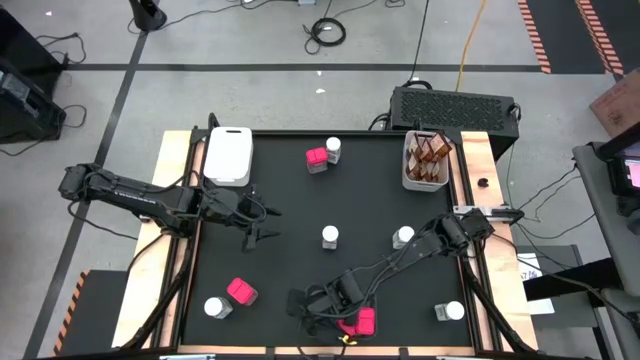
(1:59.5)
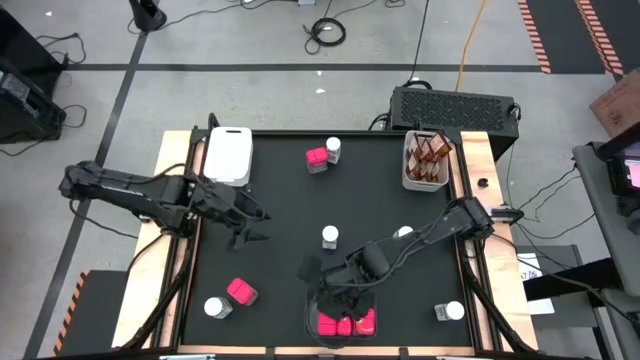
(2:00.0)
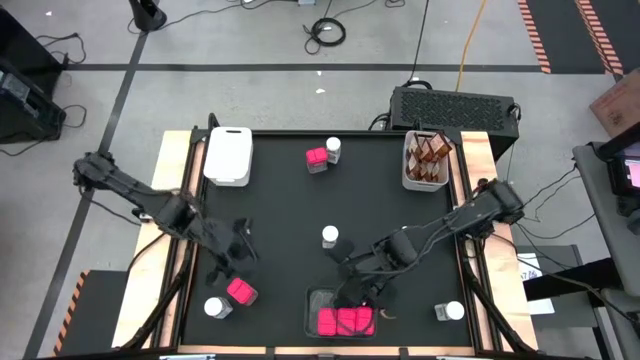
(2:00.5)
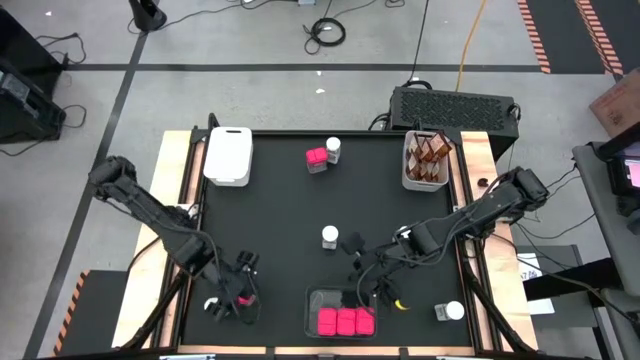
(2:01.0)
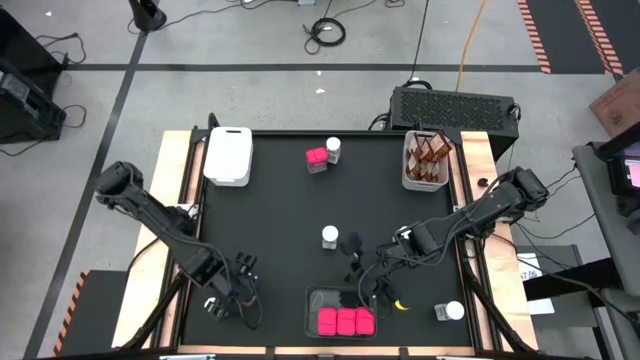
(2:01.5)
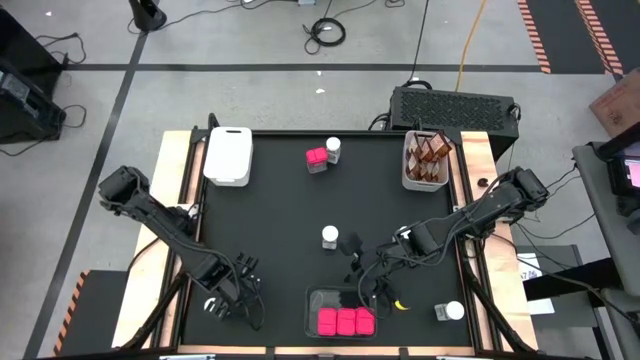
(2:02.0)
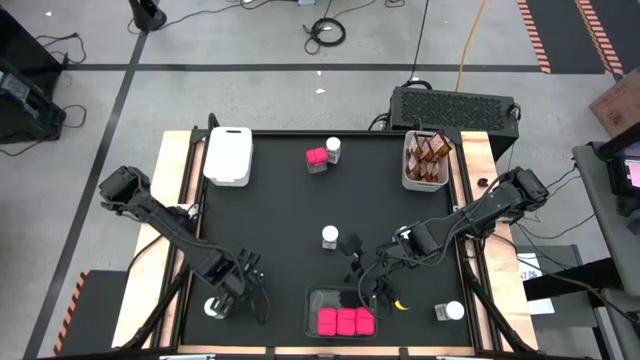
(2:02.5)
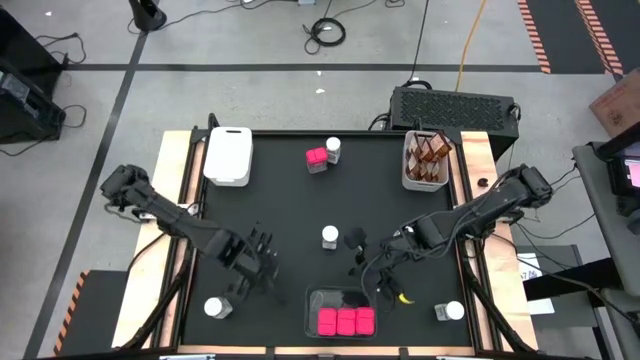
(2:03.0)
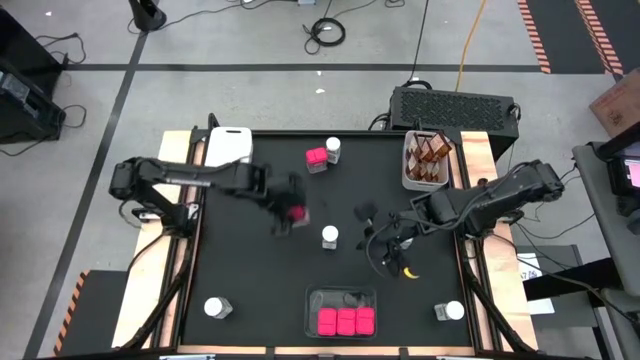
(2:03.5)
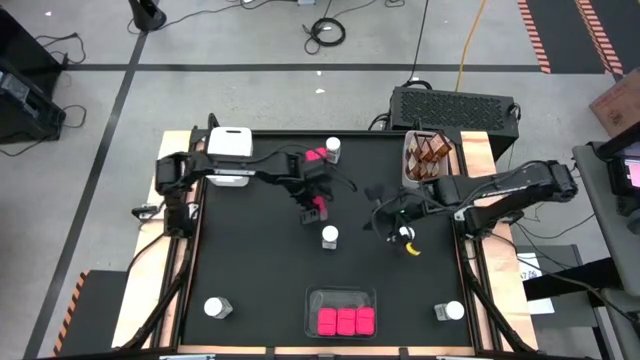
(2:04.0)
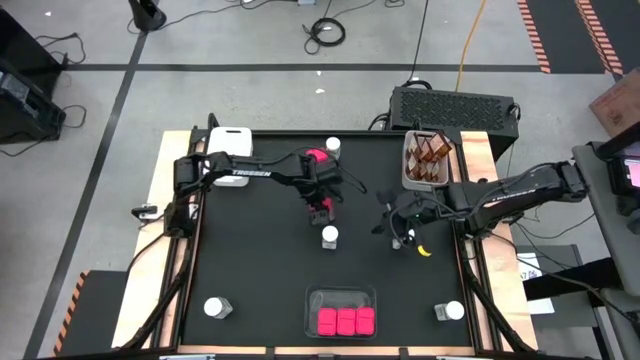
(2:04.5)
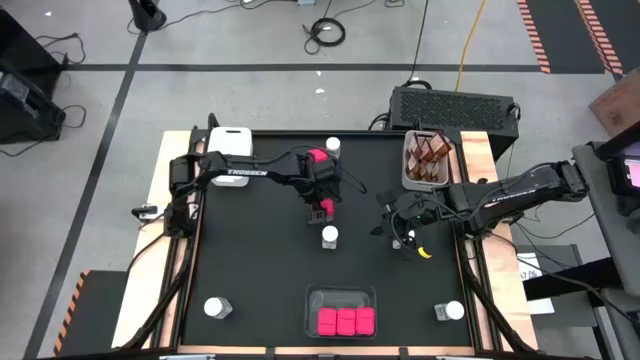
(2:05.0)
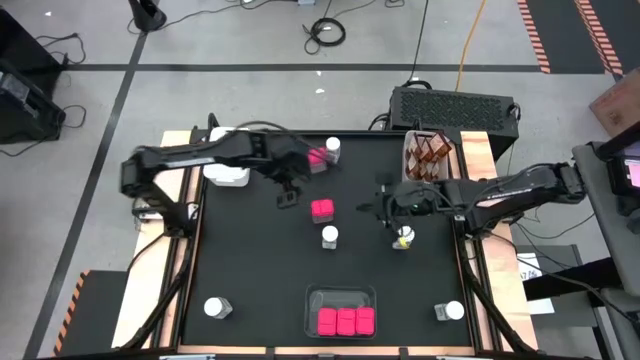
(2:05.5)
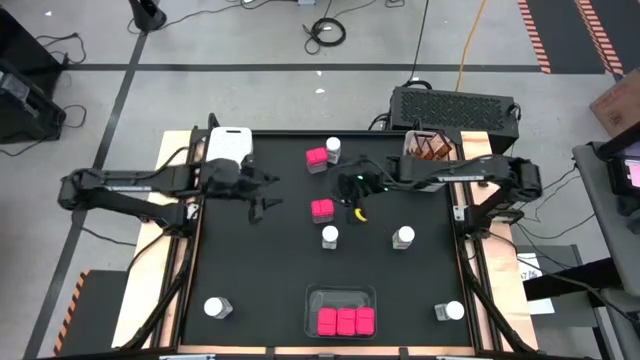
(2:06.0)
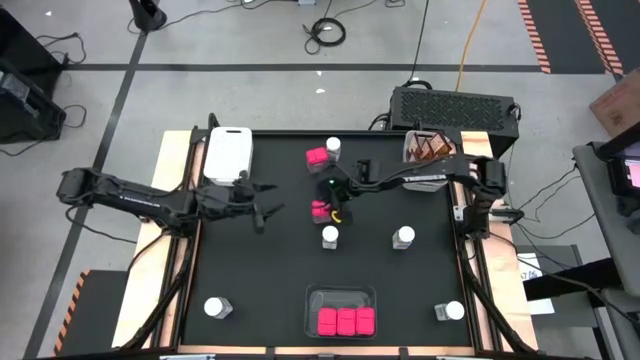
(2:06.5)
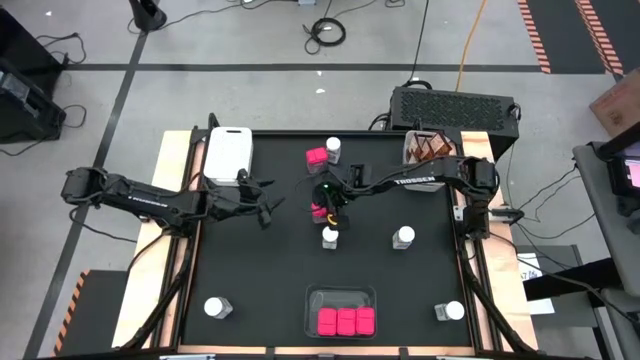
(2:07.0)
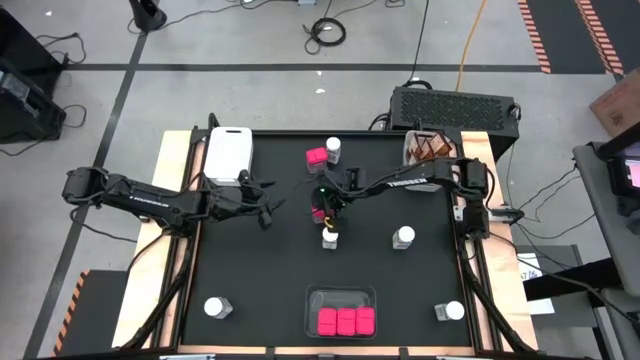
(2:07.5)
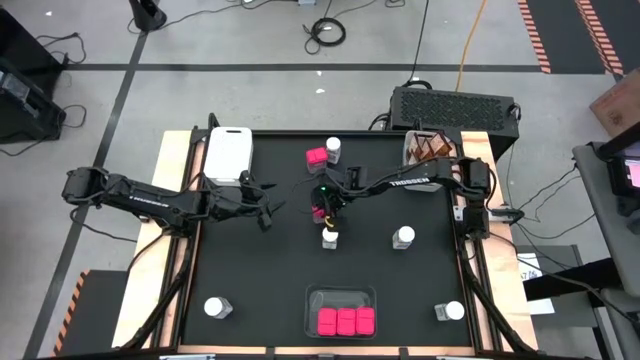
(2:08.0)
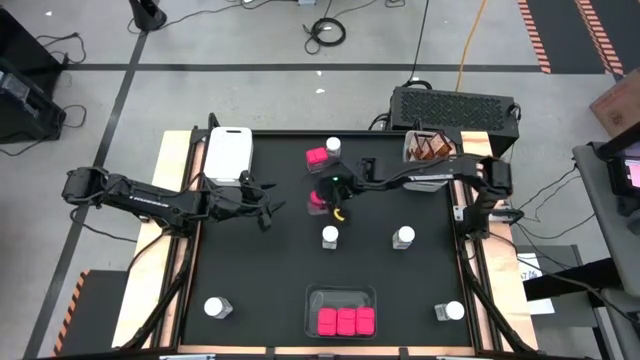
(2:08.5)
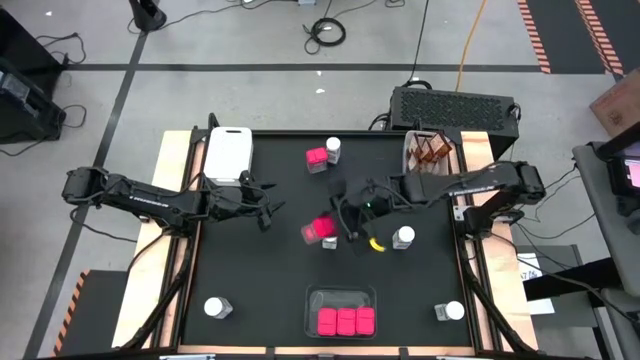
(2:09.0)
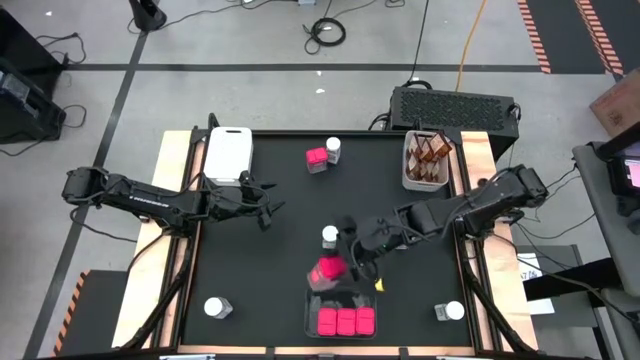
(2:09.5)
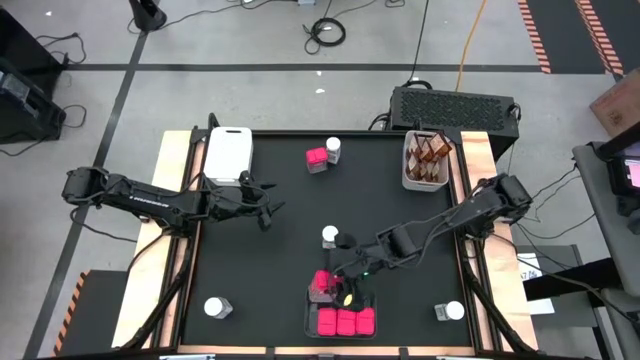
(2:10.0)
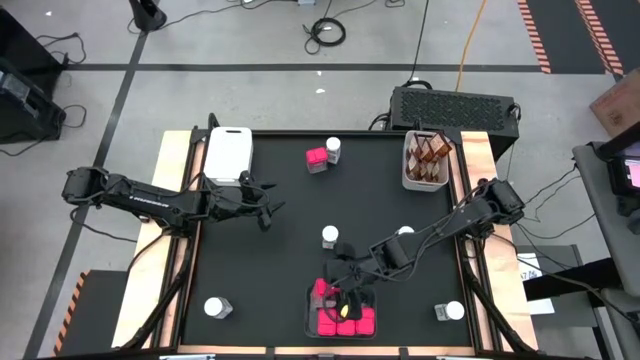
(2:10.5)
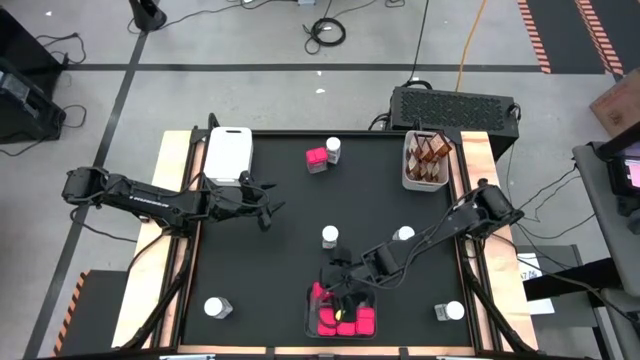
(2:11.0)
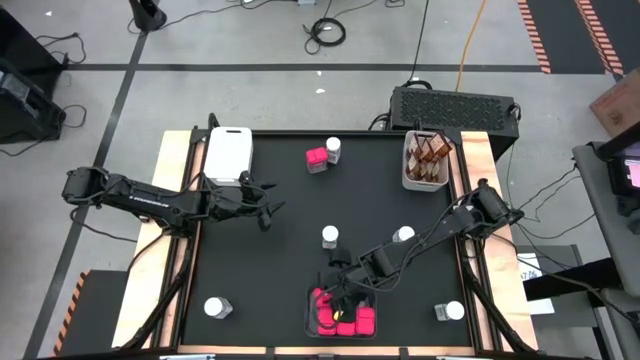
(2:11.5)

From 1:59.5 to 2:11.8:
Task: Sort spices by type
Put the red seasoning can into the black bin

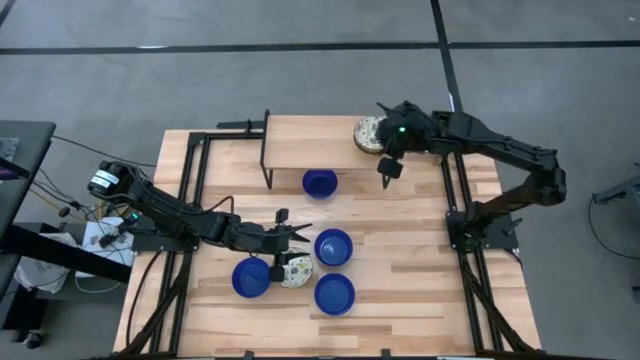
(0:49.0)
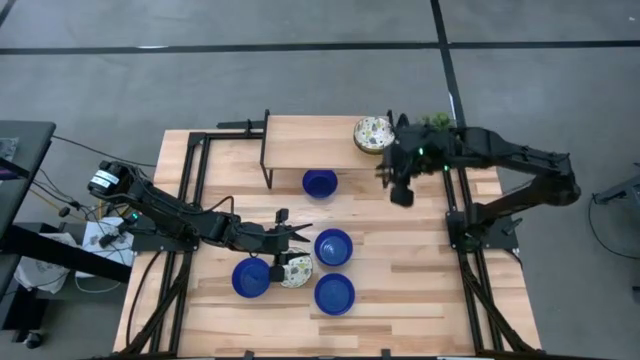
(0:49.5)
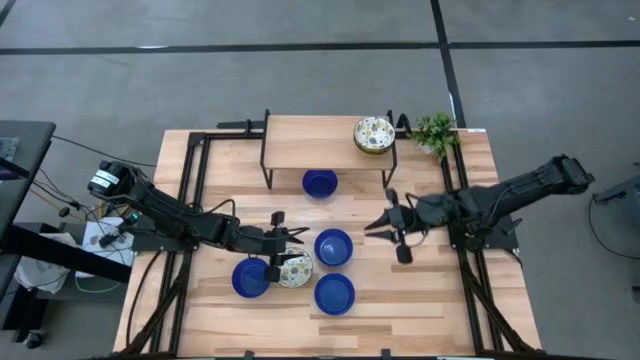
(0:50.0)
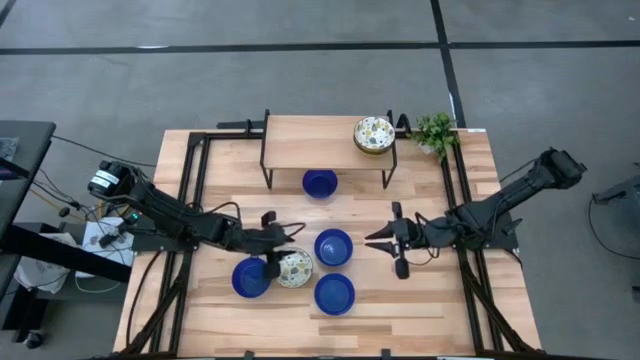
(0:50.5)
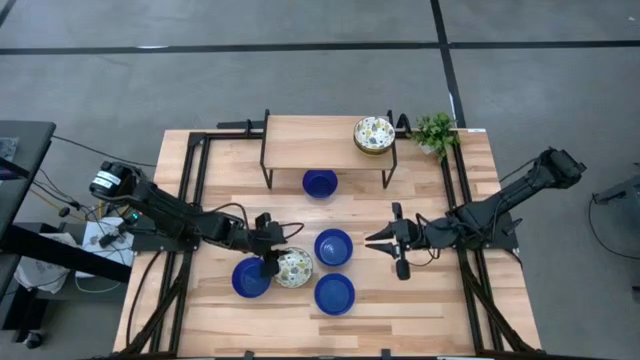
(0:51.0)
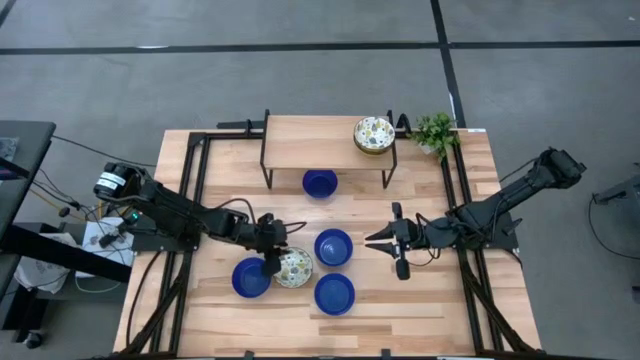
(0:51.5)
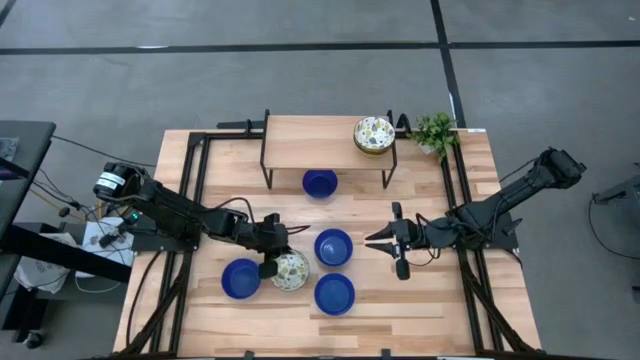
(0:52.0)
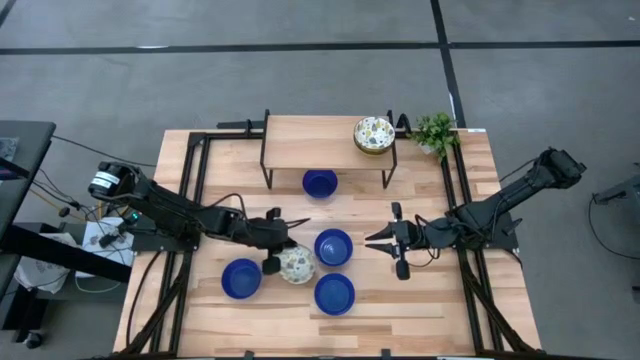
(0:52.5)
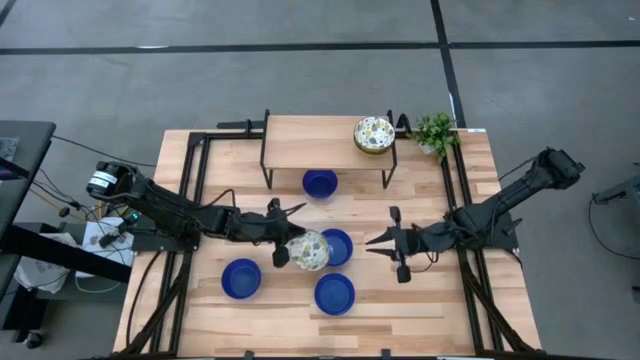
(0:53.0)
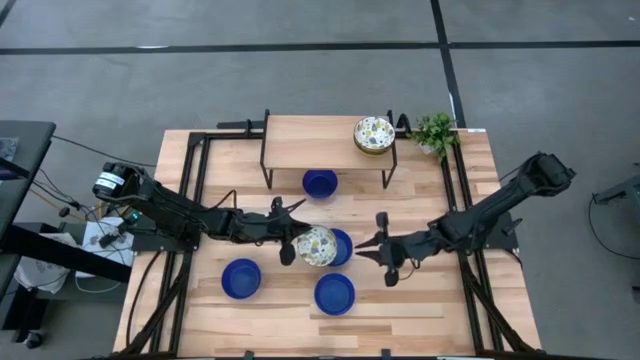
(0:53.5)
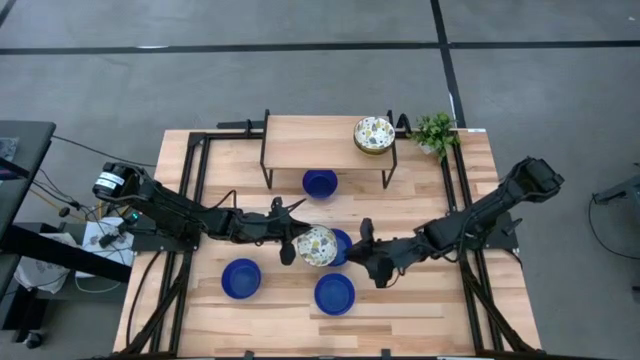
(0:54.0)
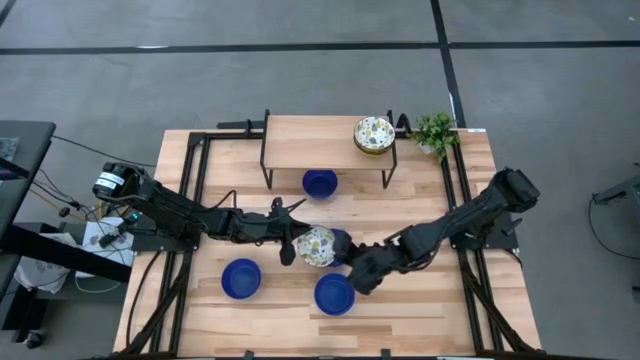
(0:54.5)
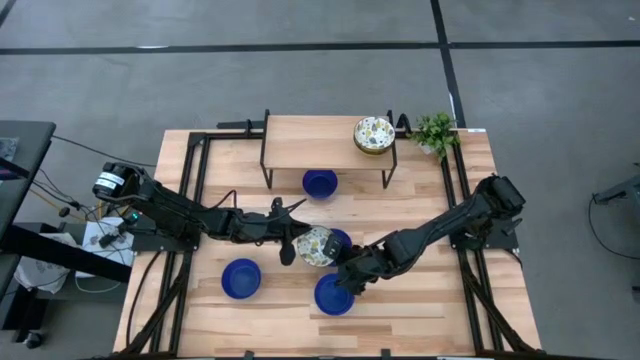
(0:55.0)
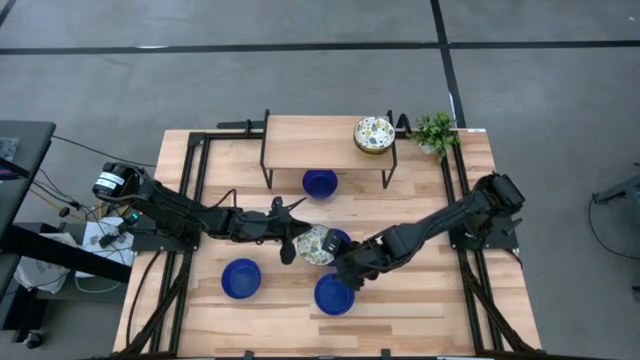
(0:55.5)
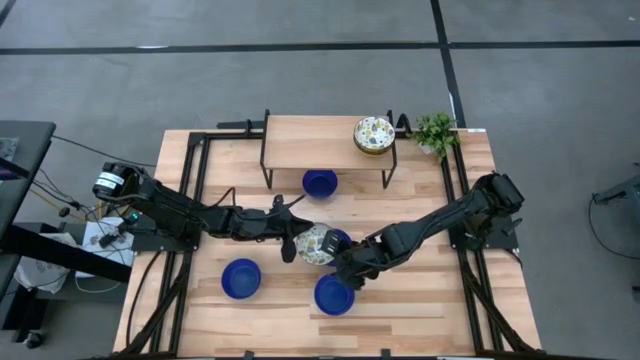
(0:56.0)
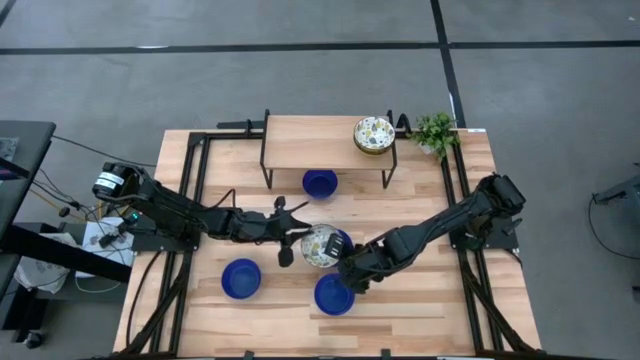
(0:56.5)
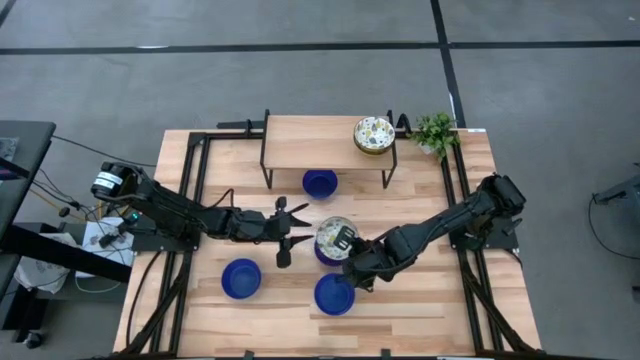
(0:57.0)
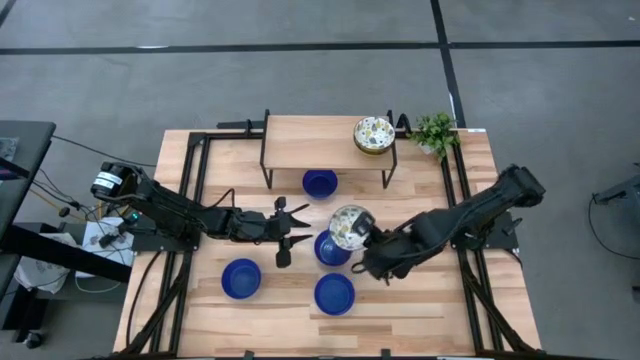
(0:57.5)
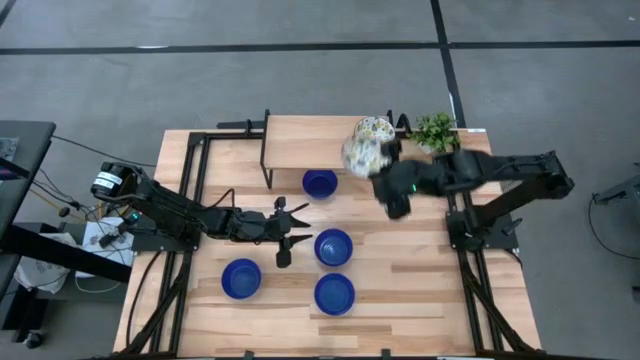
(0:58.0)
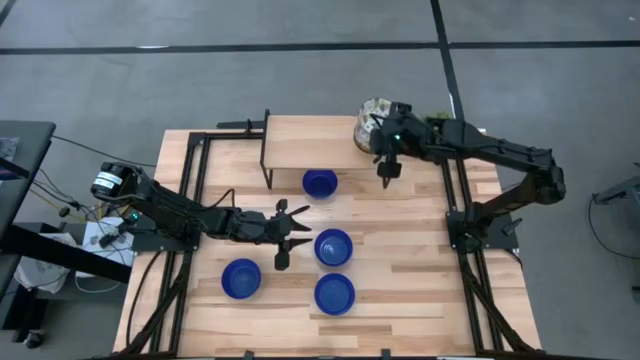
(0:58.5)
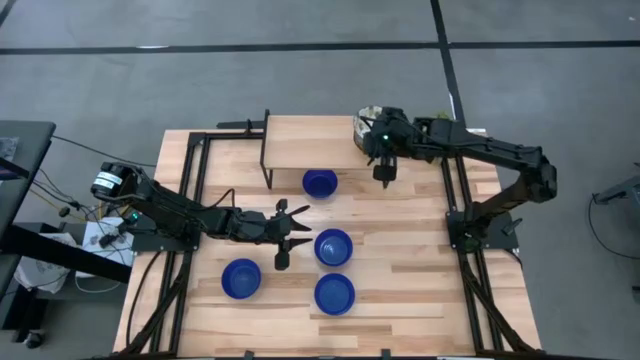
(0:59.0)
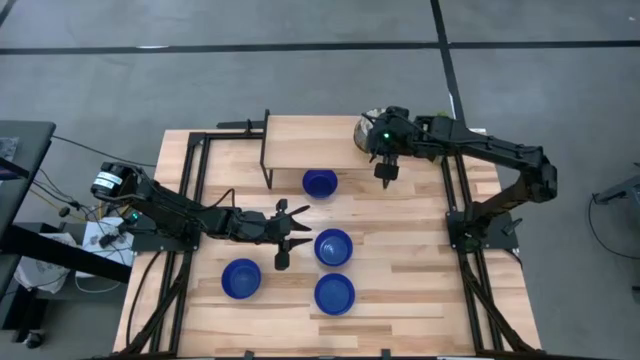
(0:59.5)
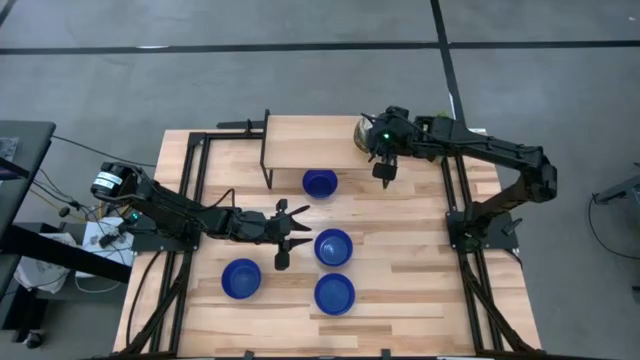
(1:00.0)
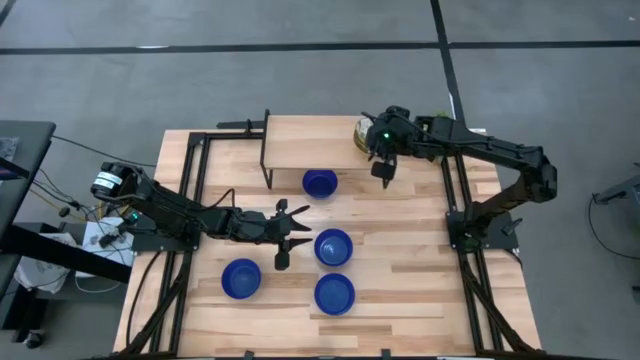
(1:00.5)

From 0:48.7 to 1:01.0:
Task: Pick & Place Mini bowls
Stack the white patterned bowl on the white patterned bowl on the shelf
